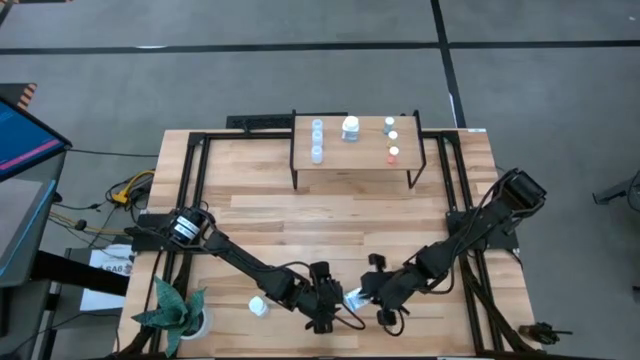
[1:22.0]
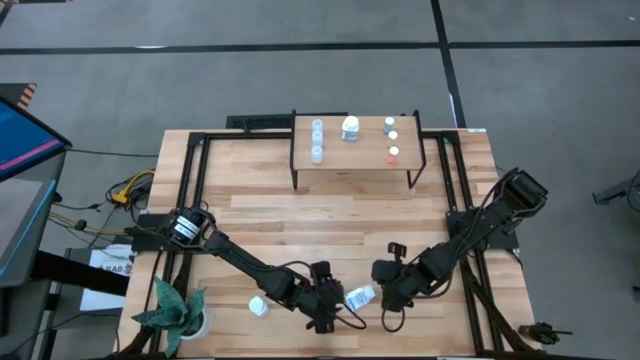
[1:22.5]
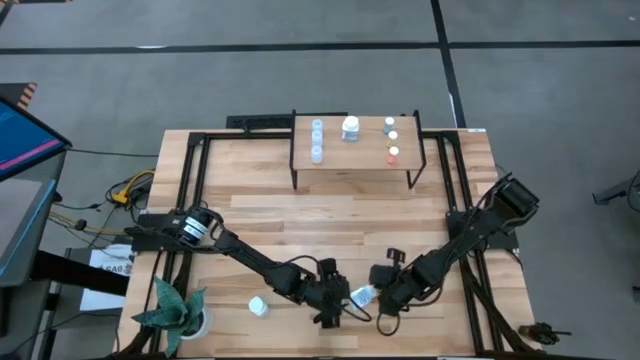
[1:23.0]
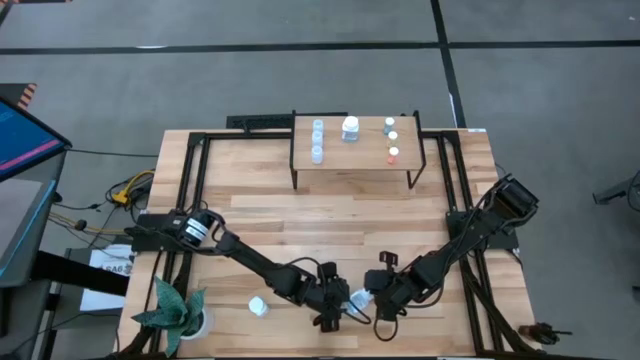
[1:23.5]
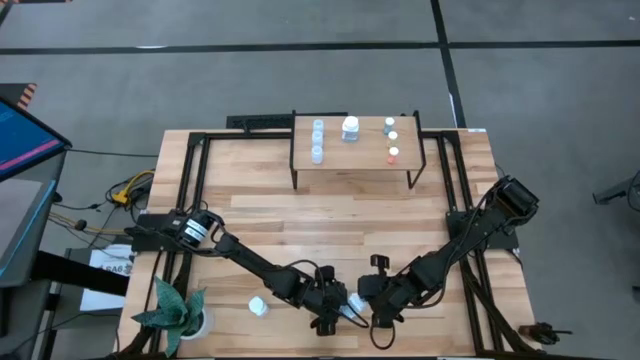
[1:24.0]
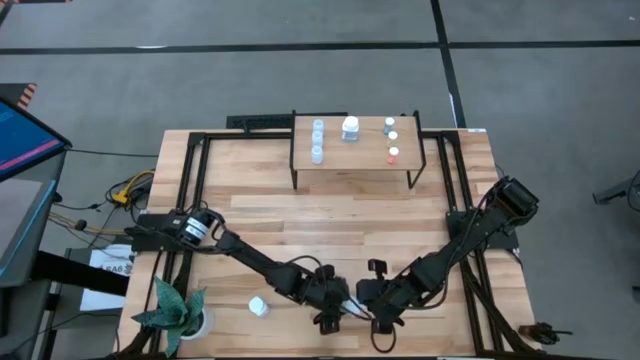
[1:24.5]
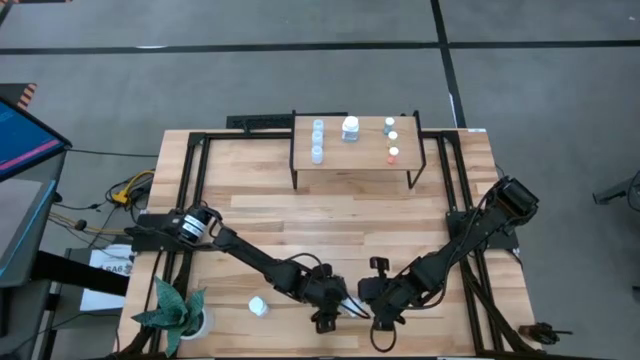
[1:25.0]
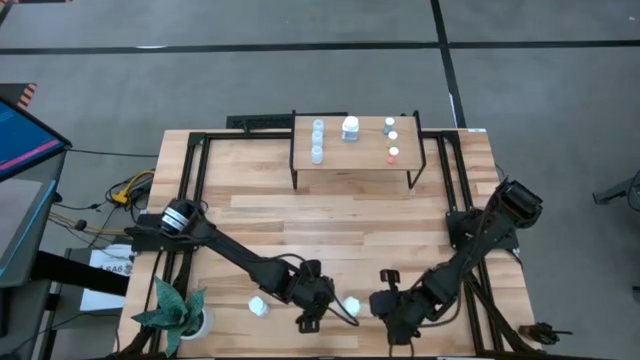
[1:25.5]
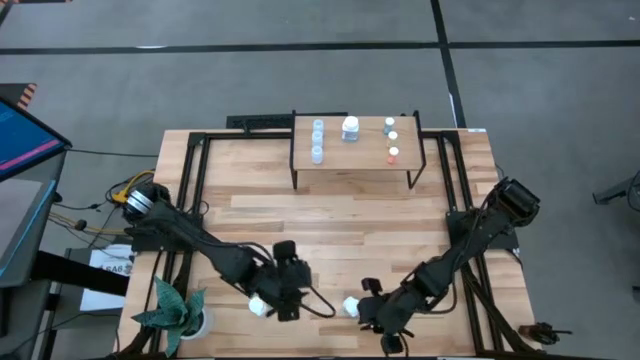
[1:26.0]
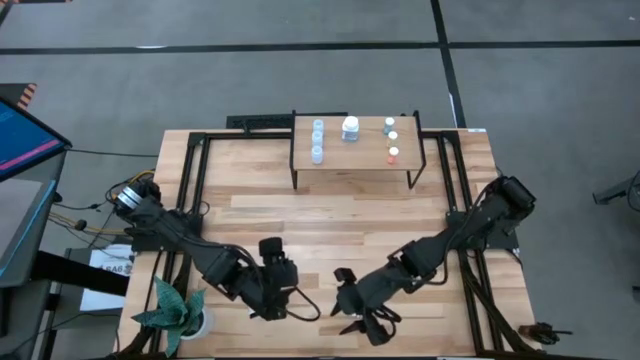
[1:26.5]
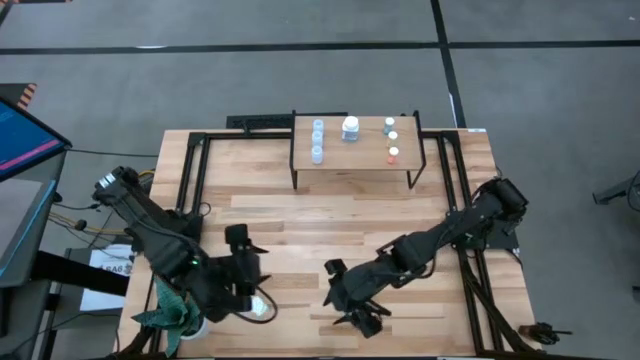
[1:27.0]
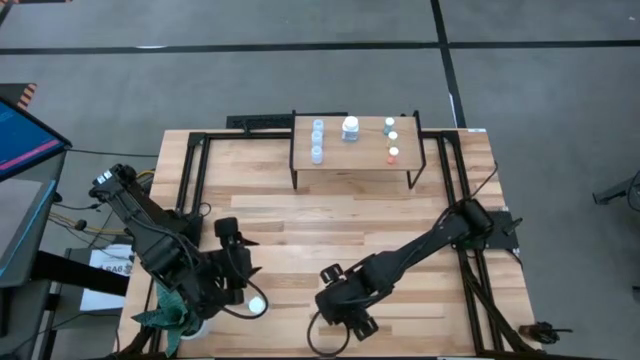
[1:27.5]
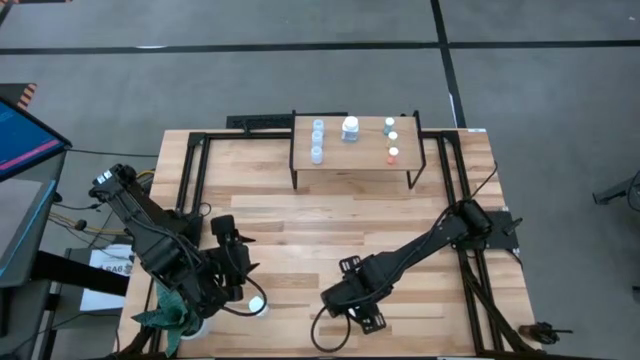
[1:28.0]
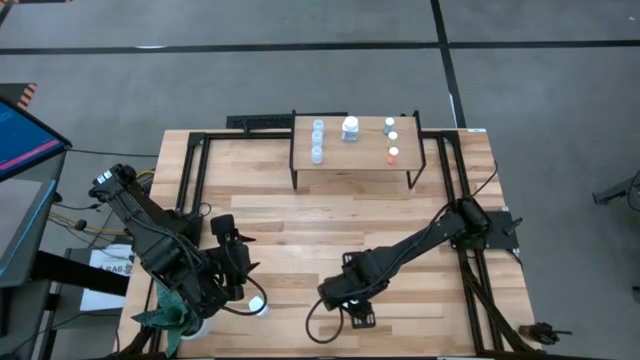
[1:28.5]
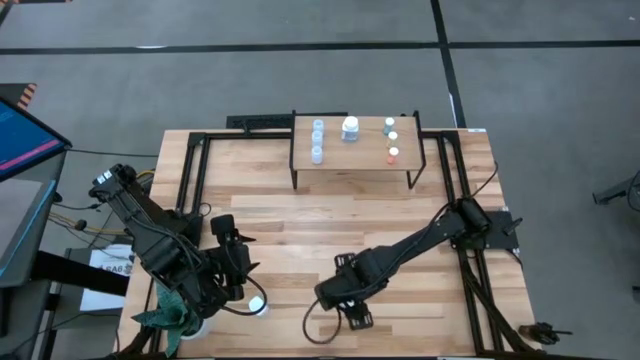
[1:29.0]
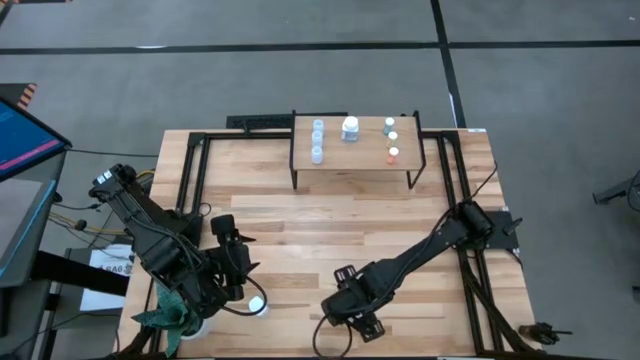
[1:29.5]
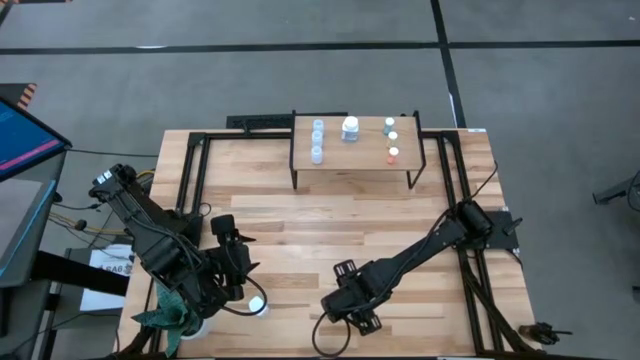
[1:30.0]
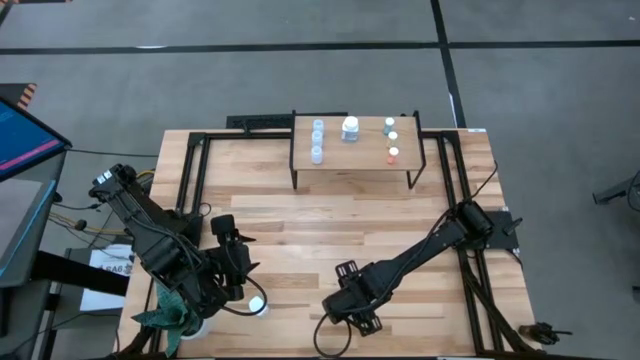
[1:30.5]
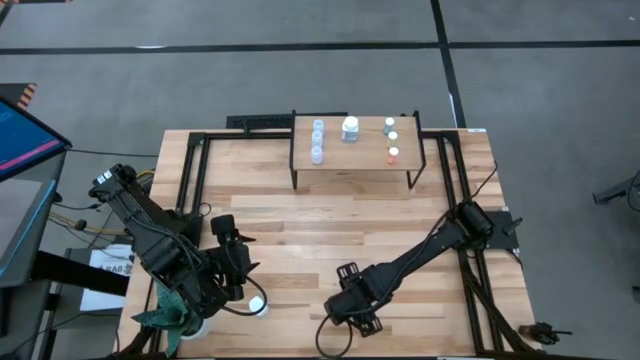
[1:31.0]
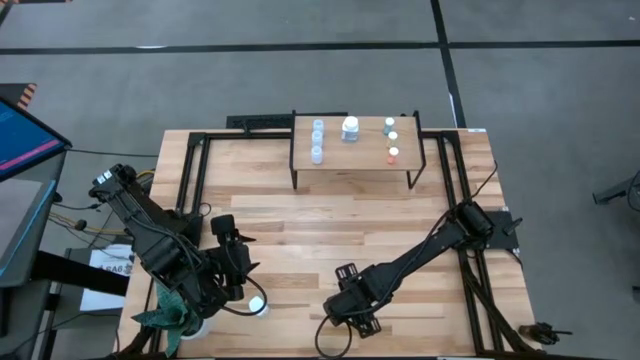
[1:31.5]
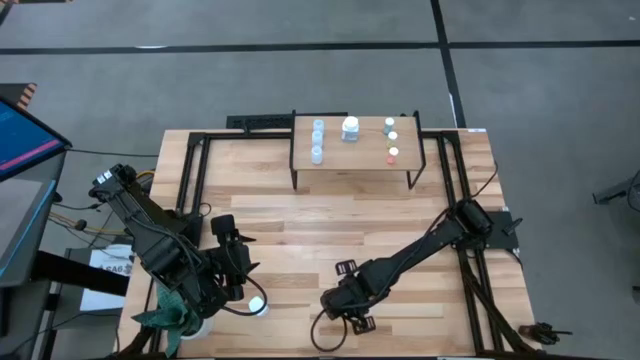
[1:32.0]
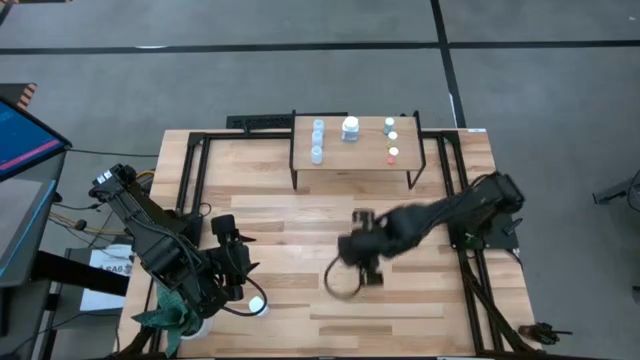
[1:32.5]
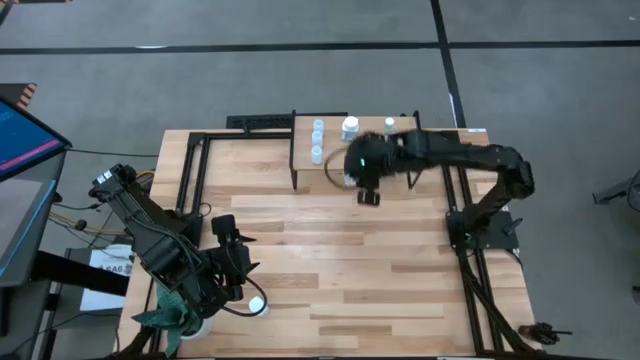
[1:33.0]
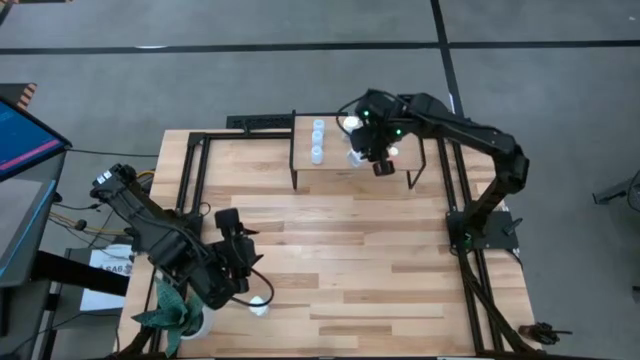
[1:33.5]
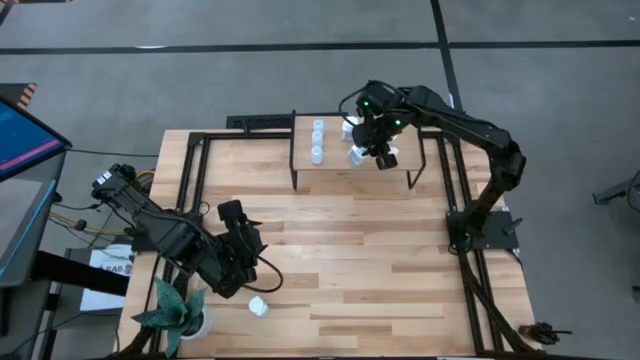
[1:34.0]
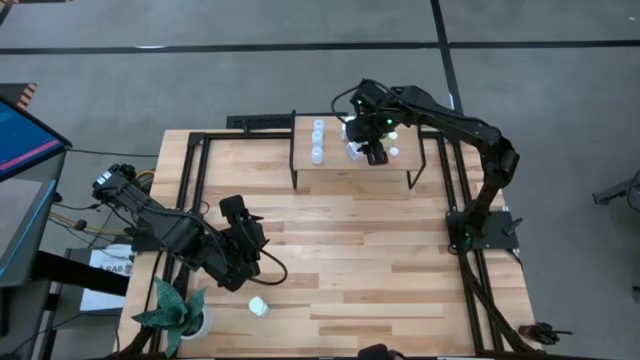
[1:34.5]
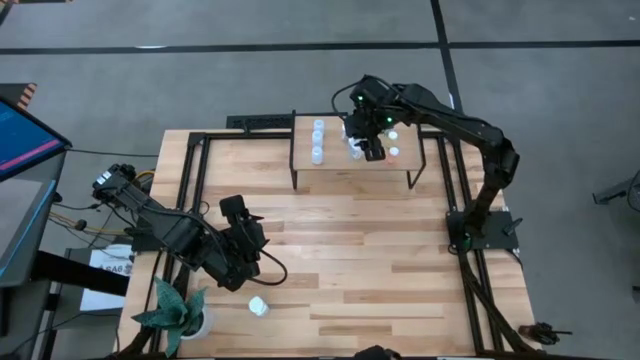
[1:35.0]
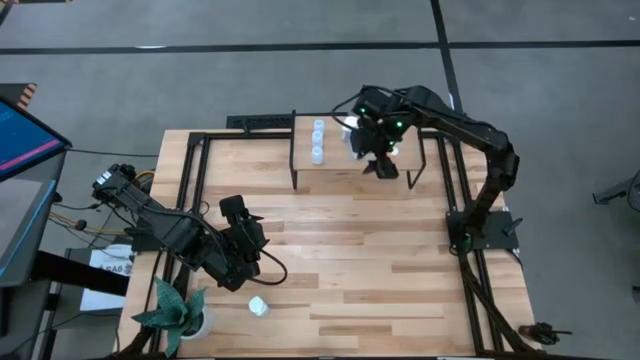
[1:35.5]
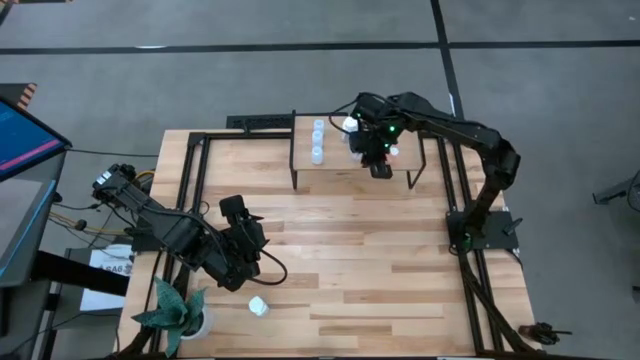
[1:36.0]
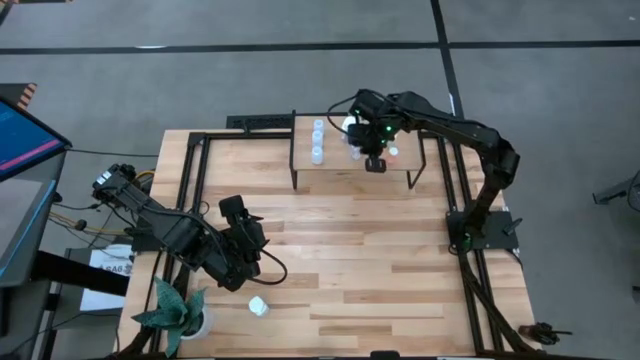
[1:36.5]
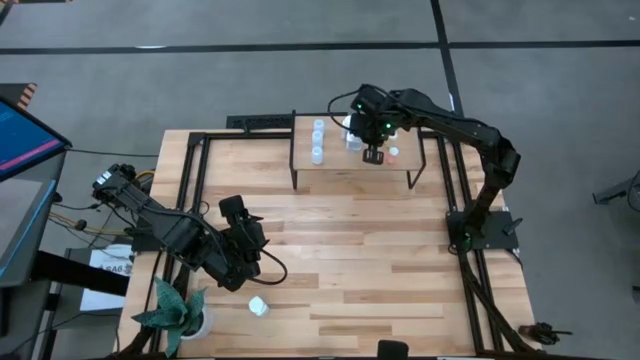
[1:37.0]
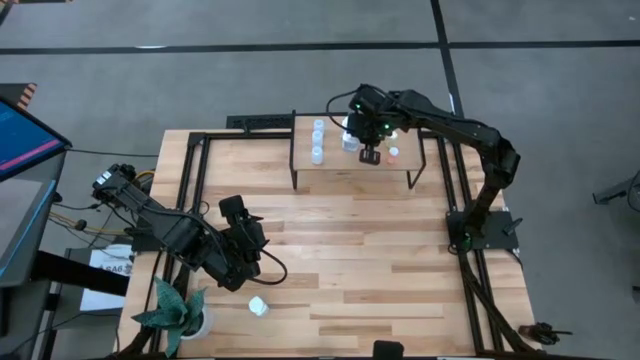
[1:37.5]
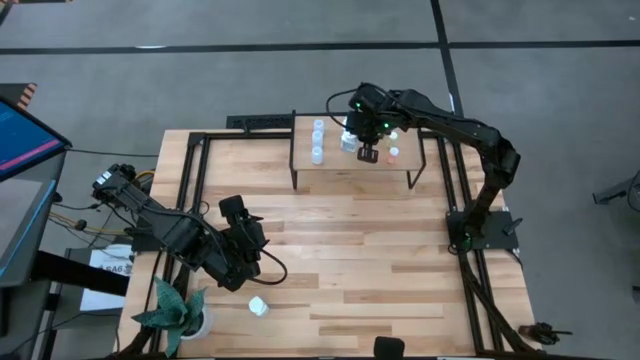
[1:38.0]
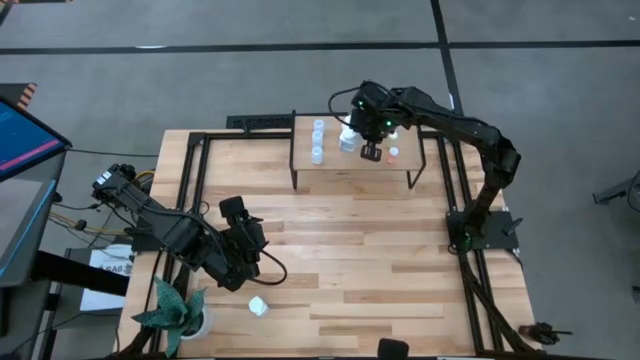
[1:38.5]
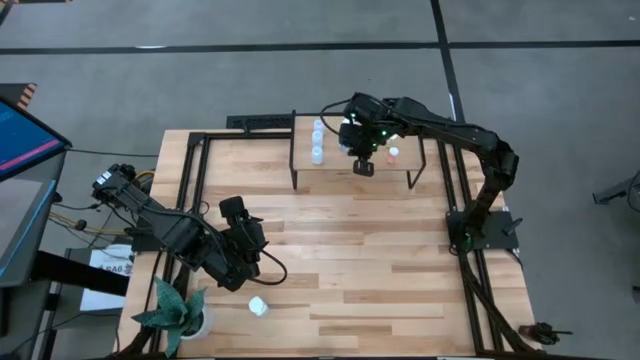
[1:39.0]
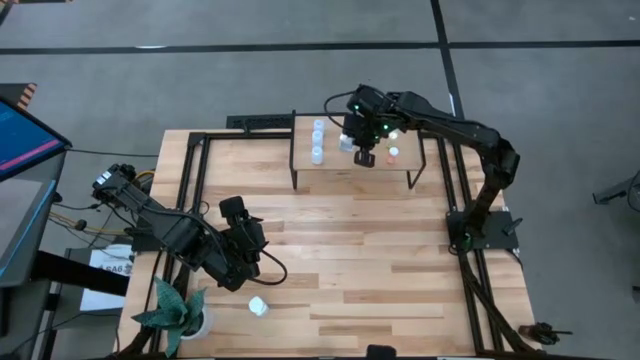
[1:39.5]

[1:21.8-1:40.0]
Task: Pick and place medicine bottles onto shelf by color
Put the right white big pill bottle on the shelf

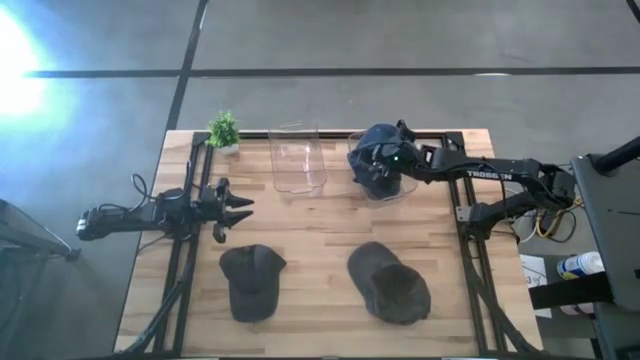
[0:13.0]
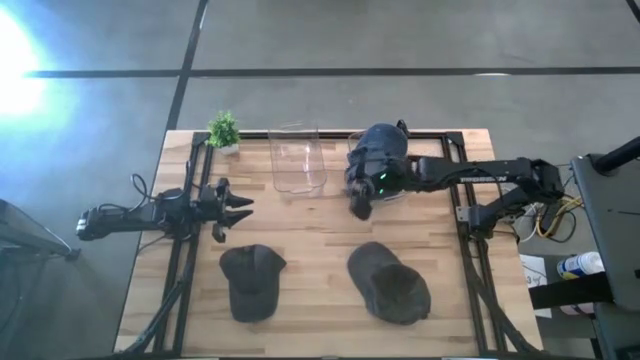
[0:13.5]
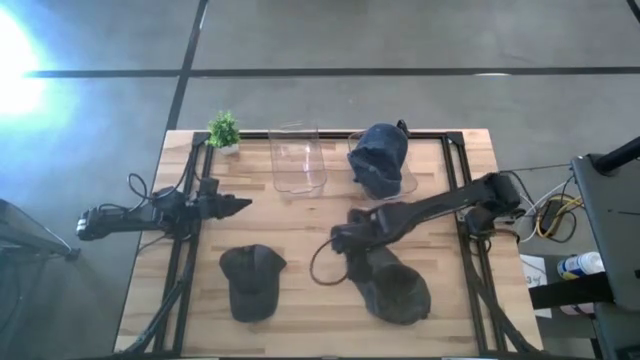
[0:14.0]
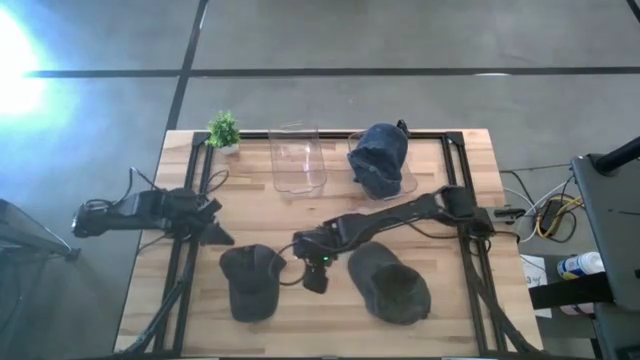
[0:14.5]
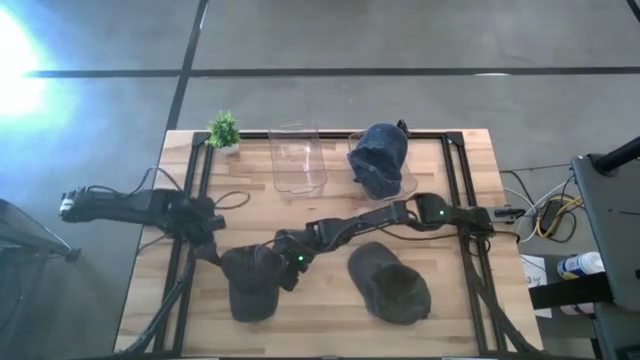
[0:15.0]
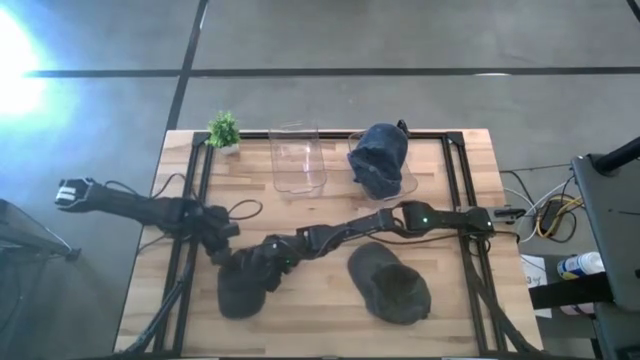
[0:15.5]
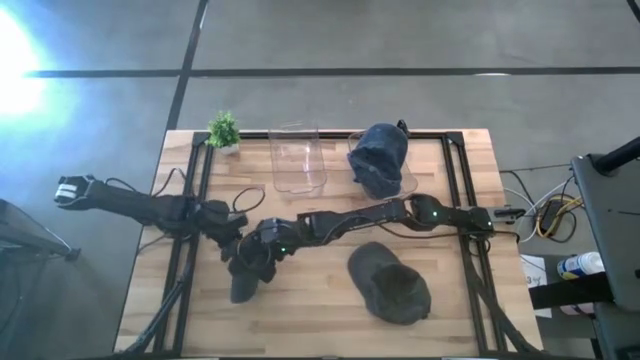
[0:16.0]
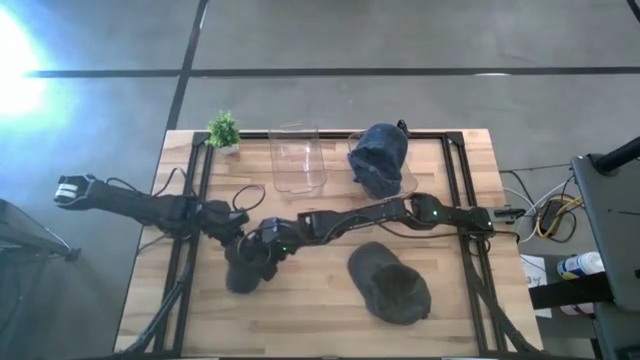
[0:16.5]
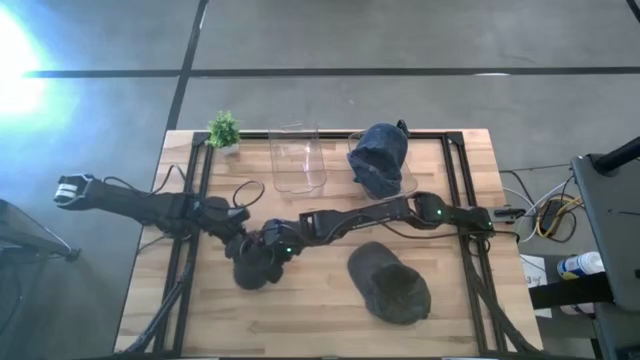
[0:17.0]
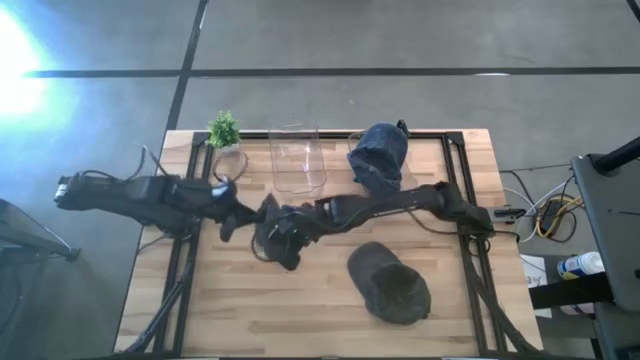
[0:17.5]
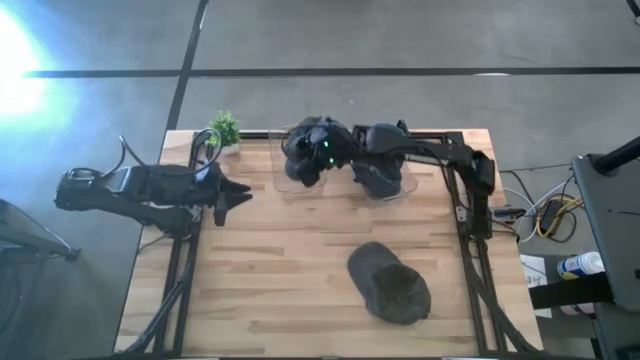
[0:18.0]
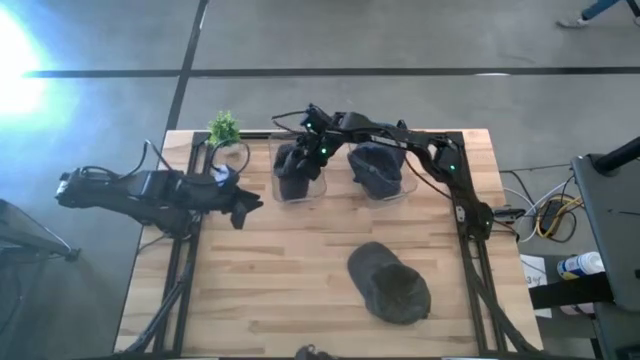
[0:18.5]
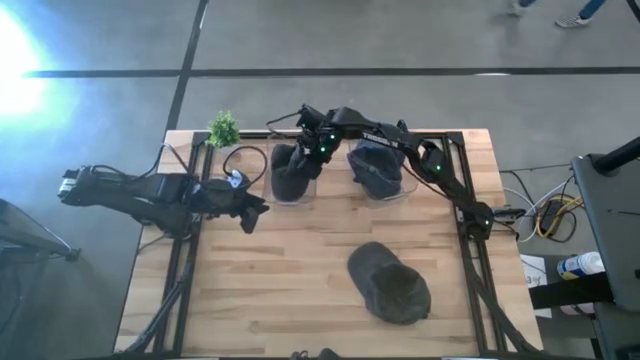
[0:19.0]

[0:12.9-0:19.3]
Task: Pick & Place hat
Put the left black cap into the left transparent bin
